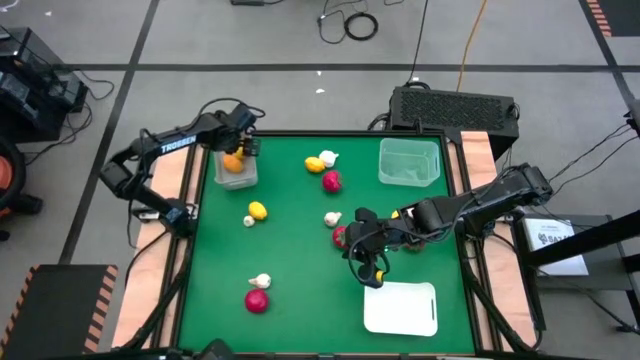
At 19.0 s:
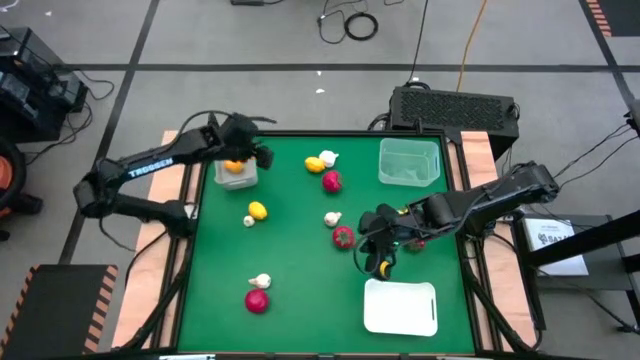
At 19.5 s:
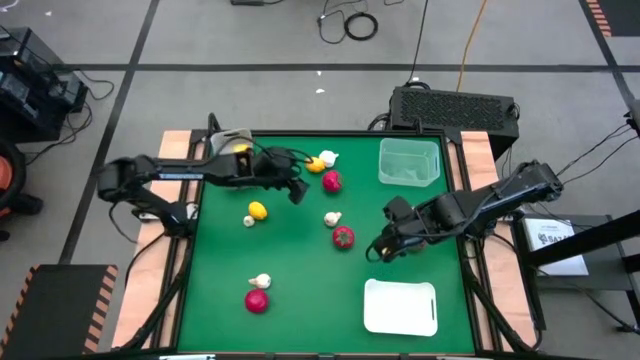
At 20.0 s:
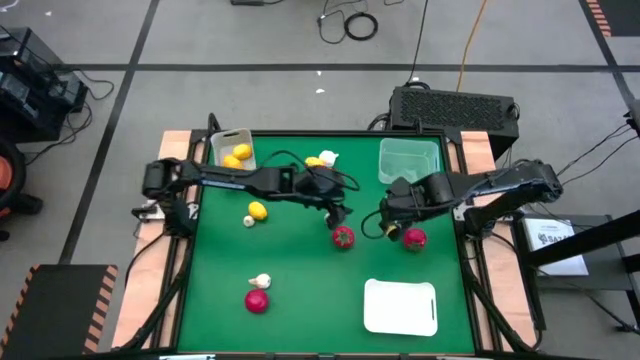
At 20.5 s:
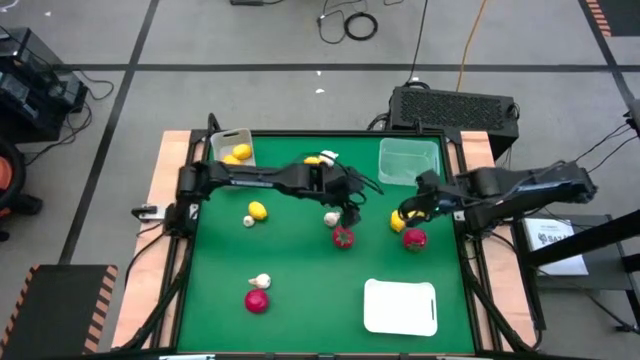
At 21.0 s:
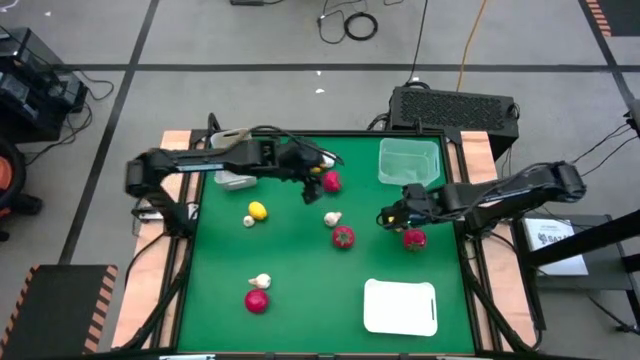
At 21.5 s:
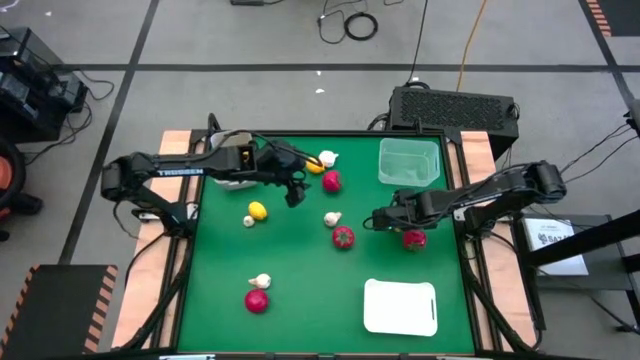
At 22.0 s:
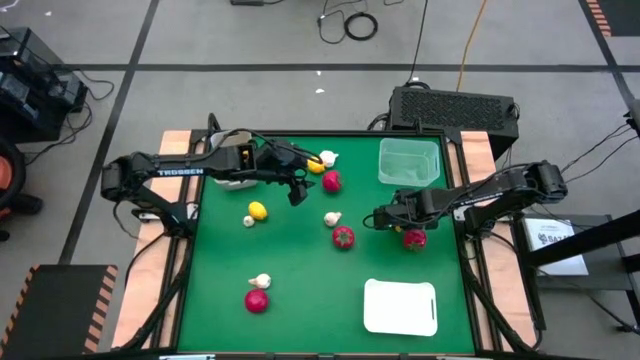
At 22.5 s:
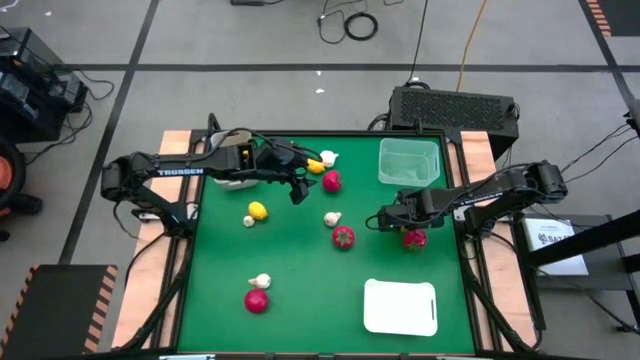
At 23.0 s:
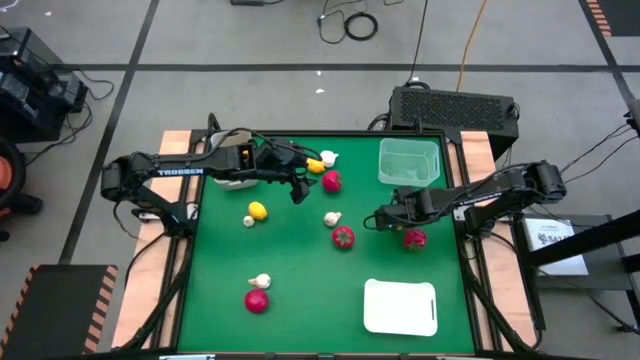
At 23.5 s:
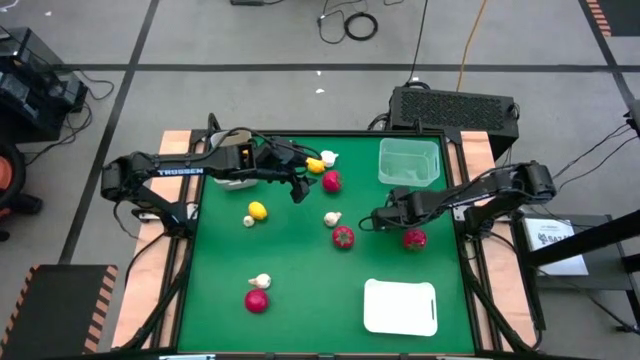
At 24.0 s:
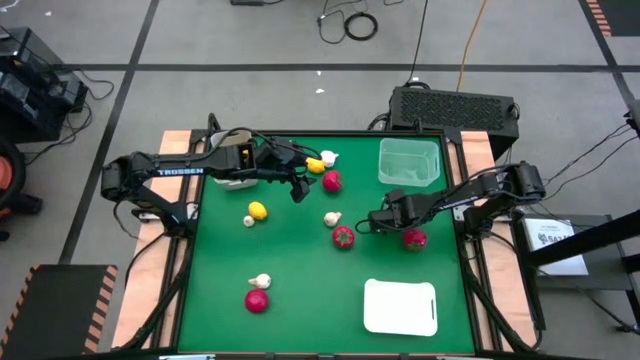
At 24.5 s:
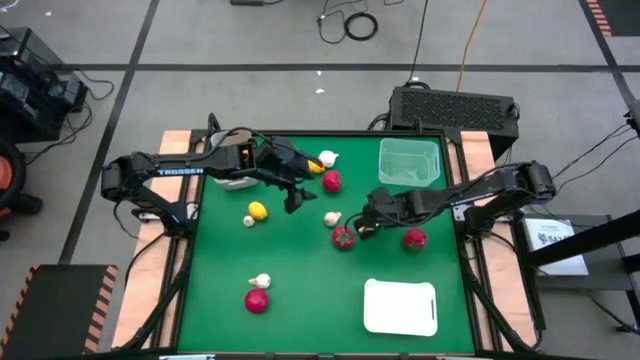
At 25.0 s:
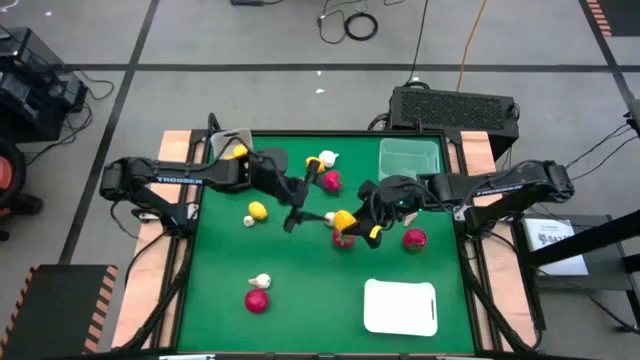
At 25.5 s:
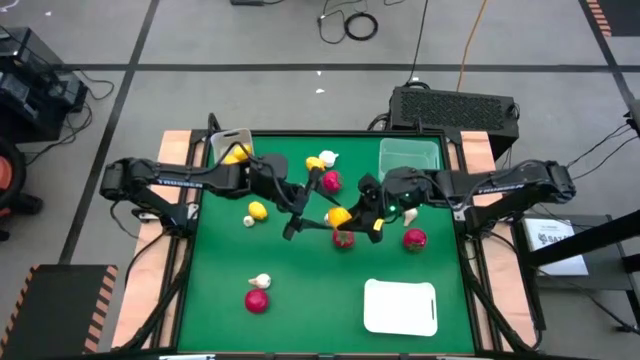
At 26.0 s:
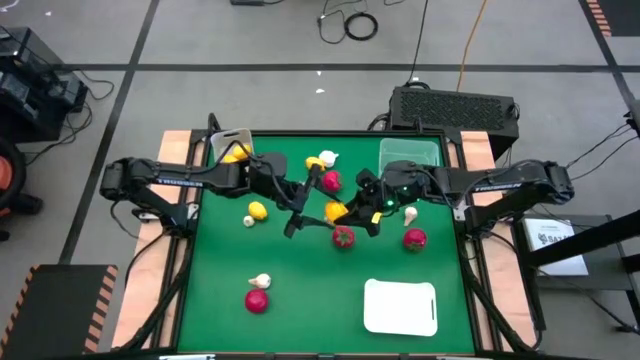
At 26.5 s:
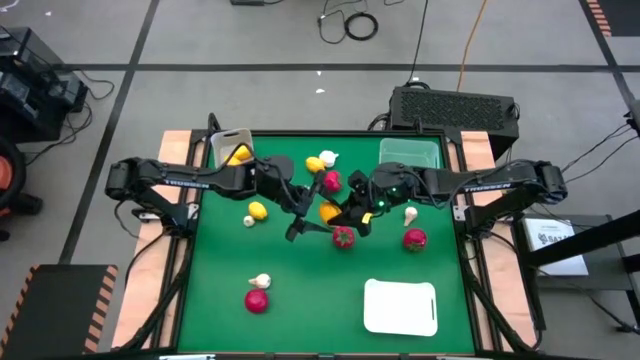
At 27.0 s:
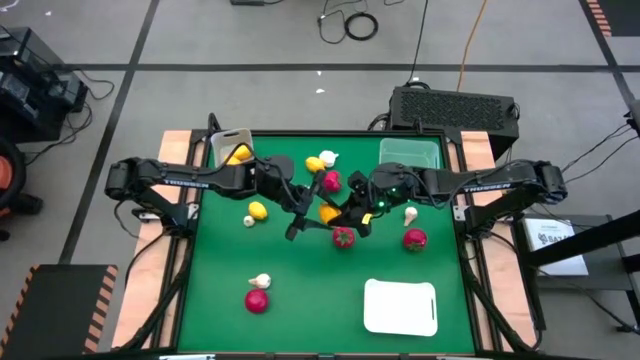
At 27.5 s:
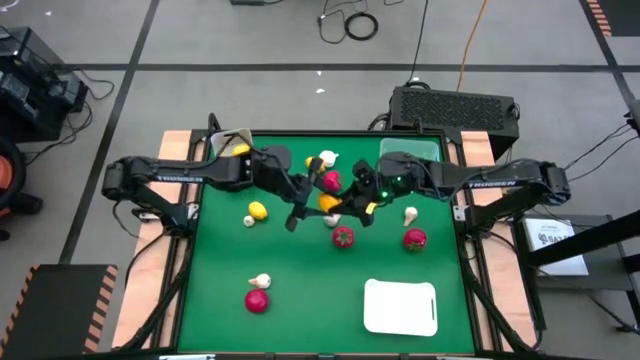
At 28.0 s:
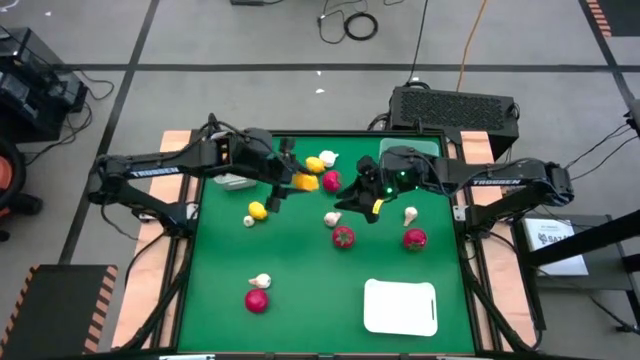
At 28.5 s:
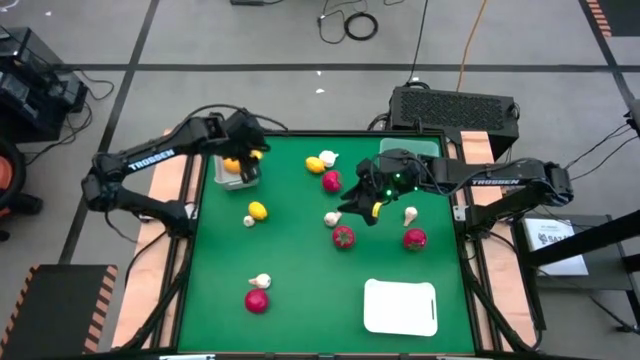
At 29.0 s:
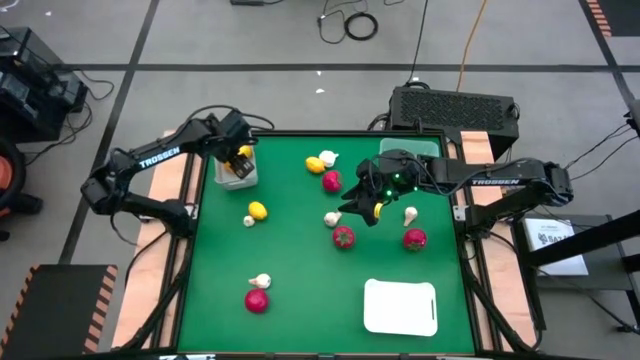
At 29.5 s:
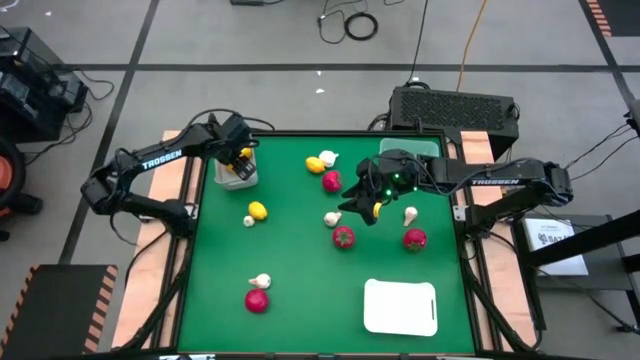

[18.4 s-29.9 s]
Task: Sort produce into baskets
Put the yellow lemon in the gray bin

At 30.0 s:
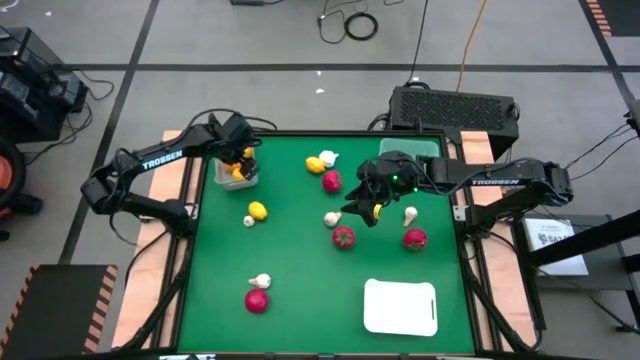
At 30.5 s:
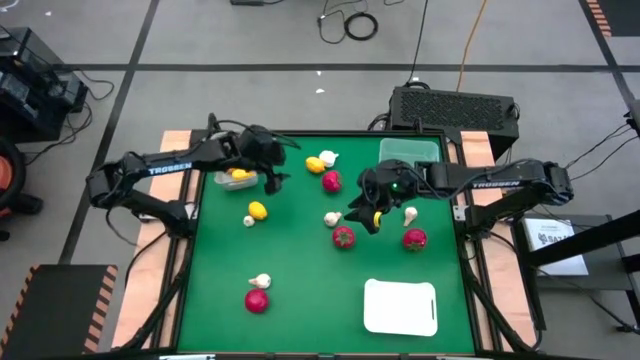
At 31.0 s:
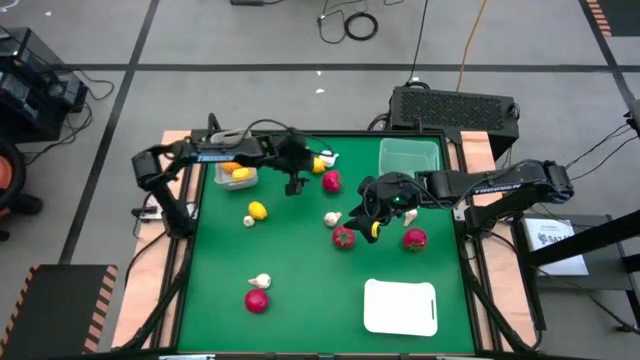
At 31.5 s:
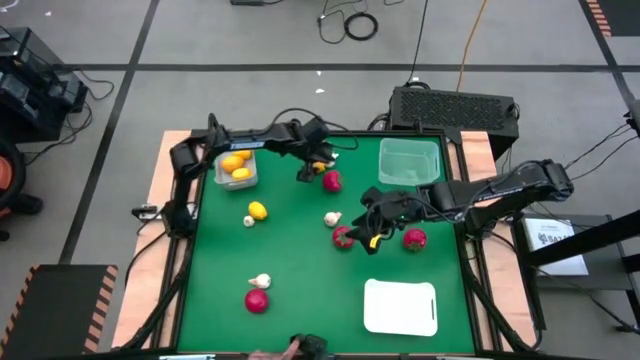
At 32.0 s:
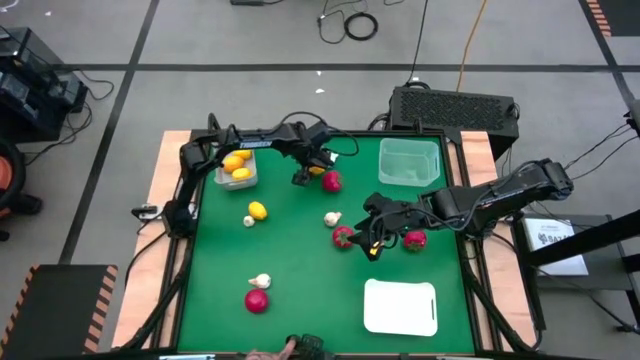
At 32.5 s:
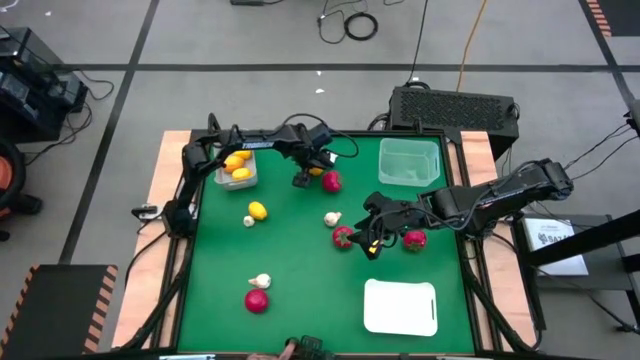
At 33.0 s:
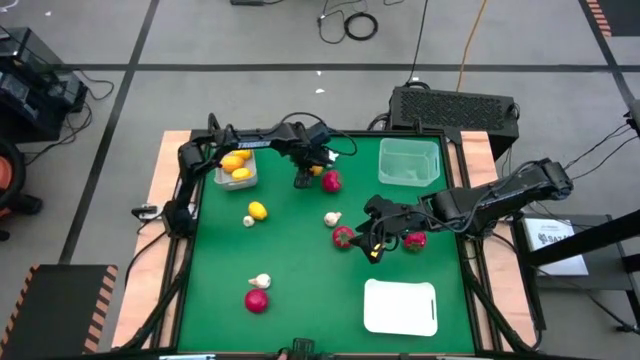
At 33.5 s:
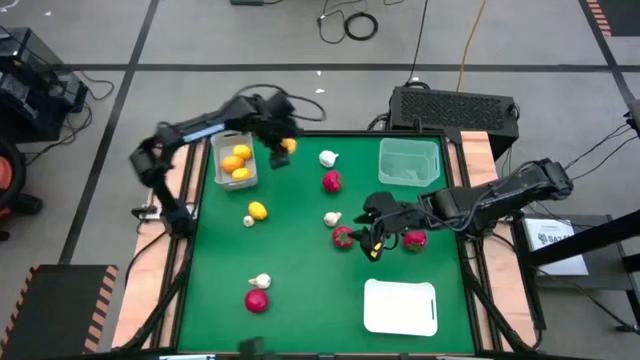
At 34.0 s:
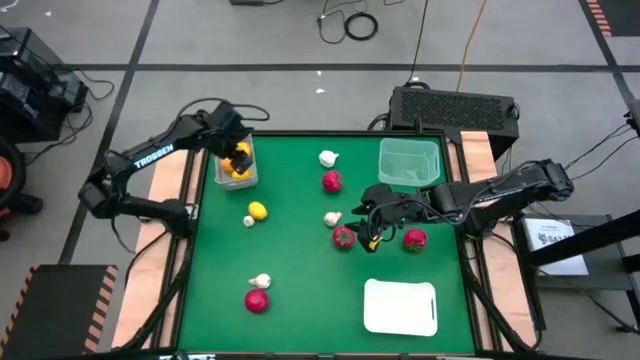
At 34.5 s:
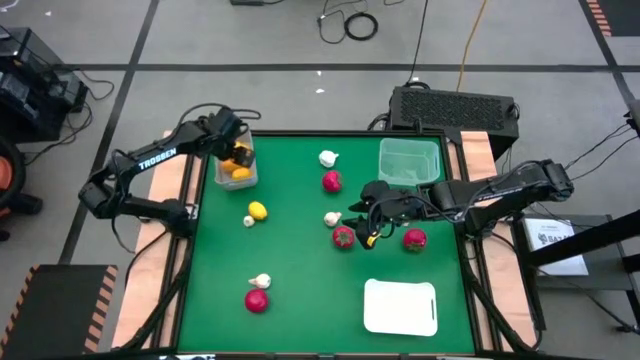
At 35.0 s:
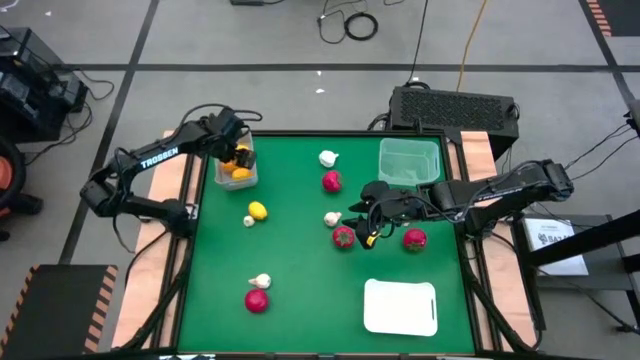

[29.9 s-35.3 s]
Put the yellow lemon in the gray bin

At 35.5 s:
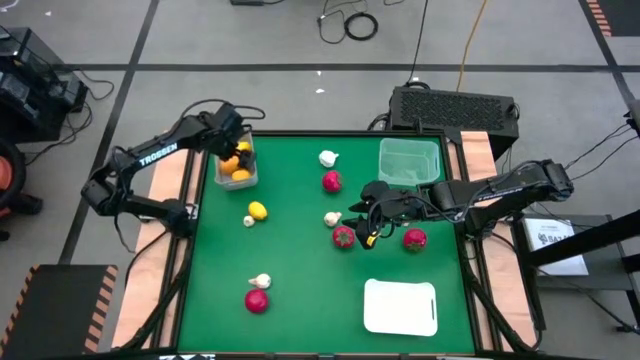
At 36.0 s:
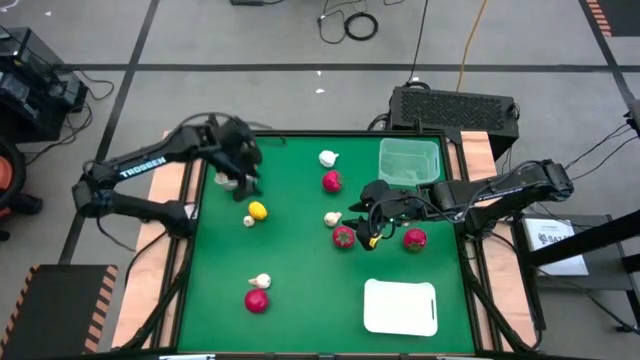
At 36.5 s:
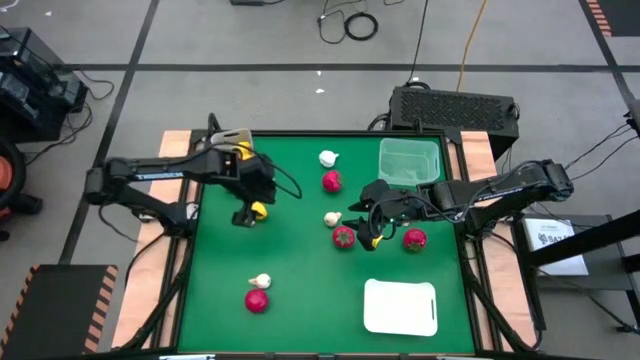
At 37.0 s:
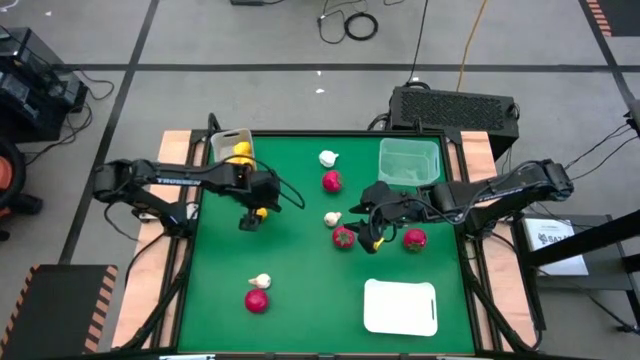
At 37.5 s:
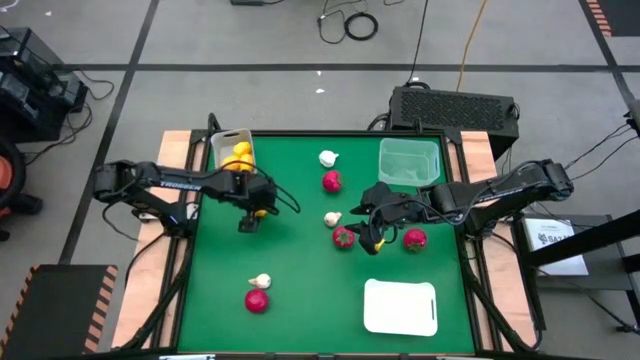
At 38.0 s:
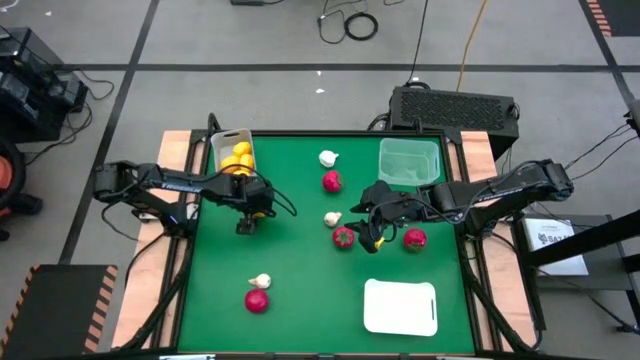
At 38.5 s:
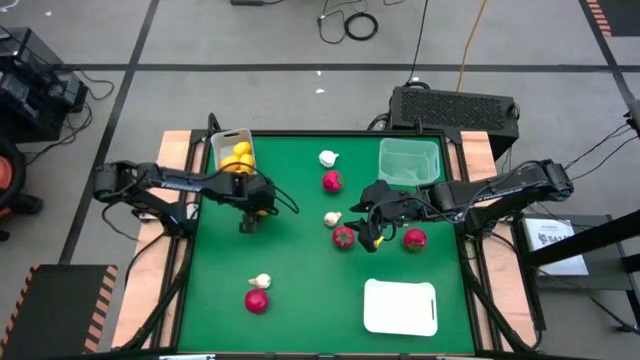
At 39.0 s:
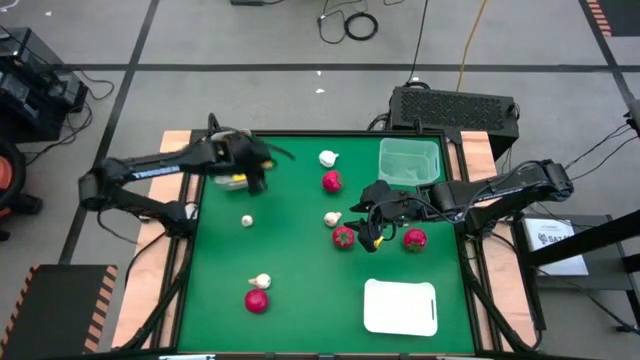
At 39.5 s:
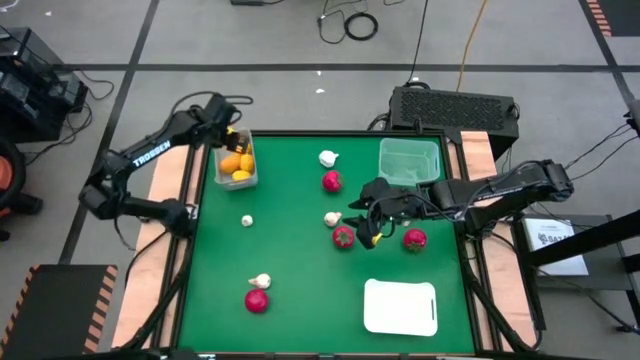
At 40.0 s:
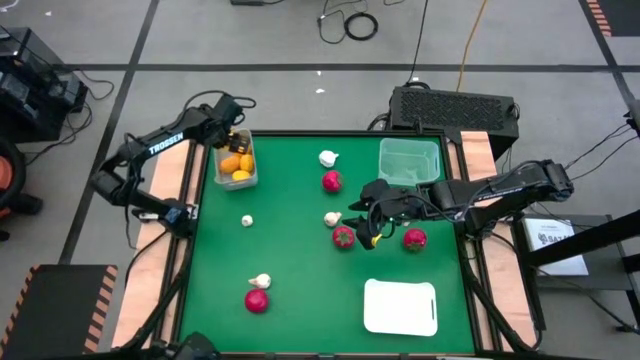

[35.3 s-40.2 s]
Put the yellow lemon in the gray bin
